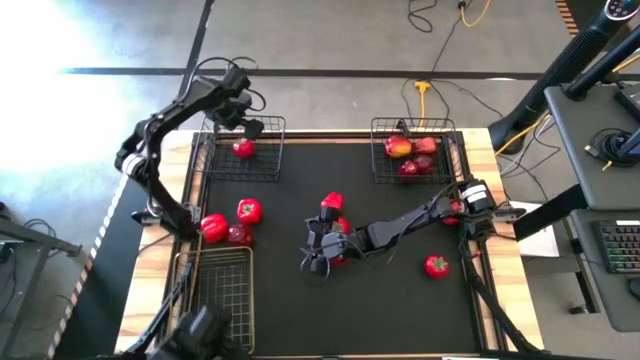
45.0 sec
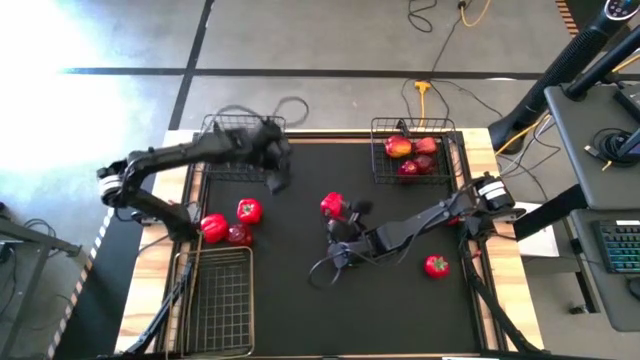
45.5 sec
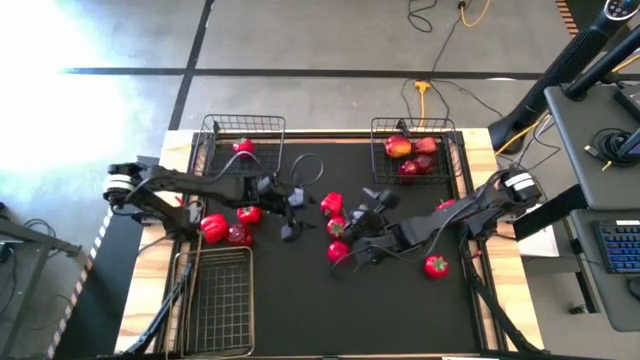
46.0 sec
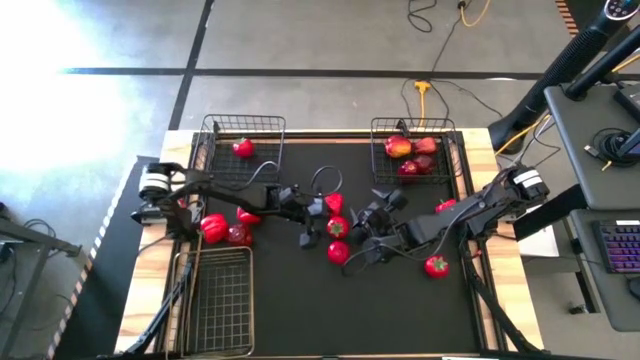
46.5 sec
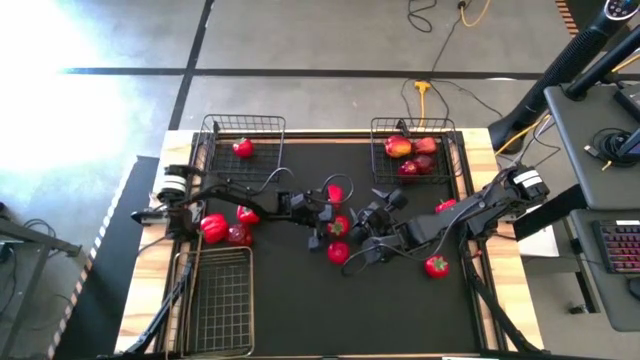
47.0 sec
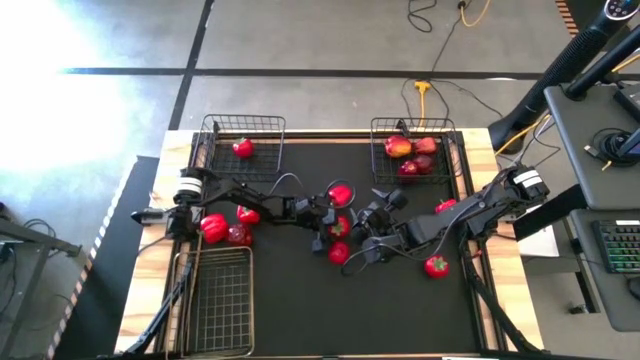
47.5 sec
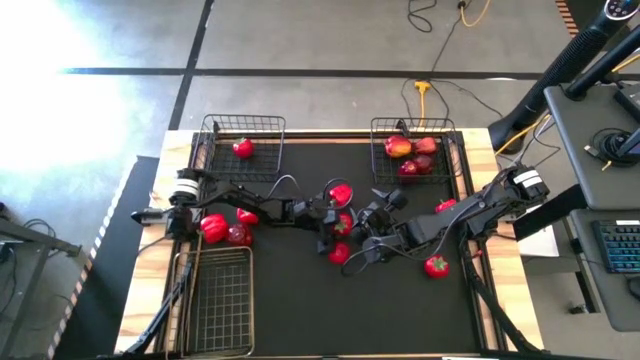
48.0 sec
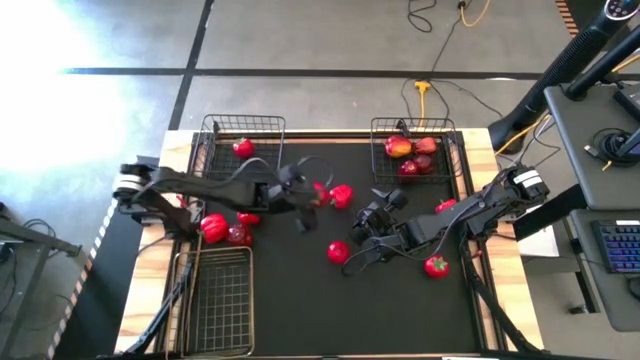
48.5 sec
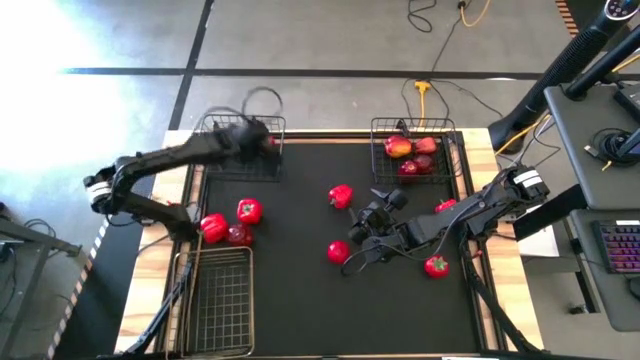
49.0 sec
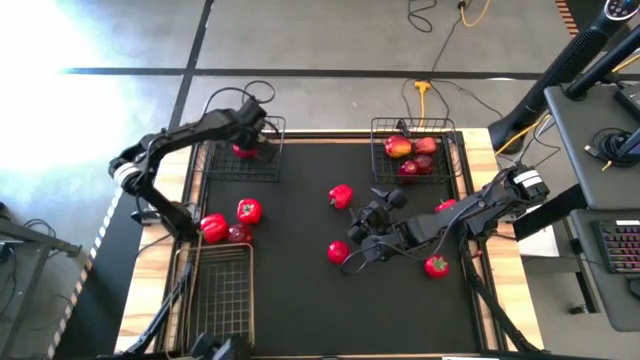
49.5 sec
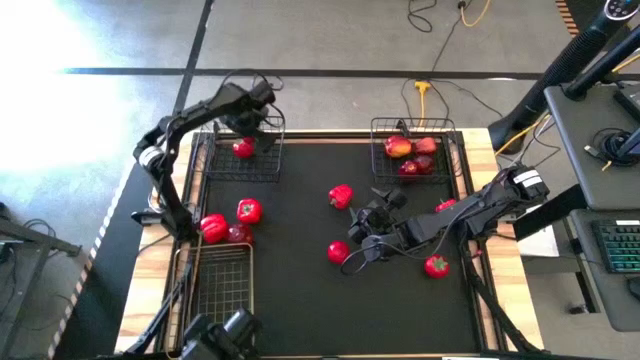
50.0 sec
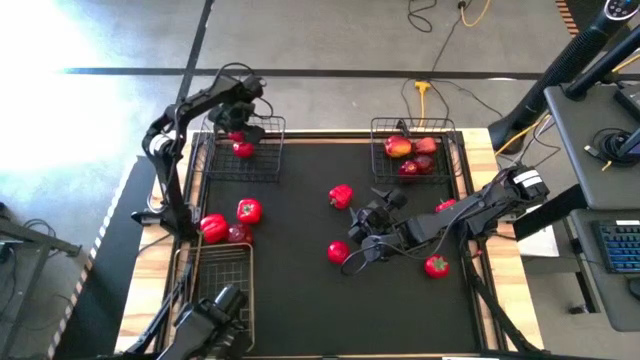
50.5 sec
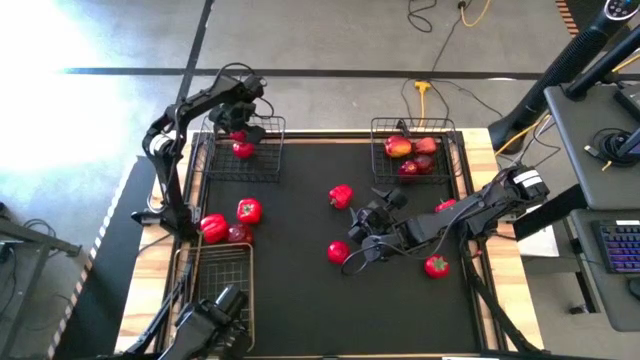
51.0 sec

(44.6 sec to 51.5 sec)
Task: Sort produce into baskets
Put the tomato into the left black wire basket

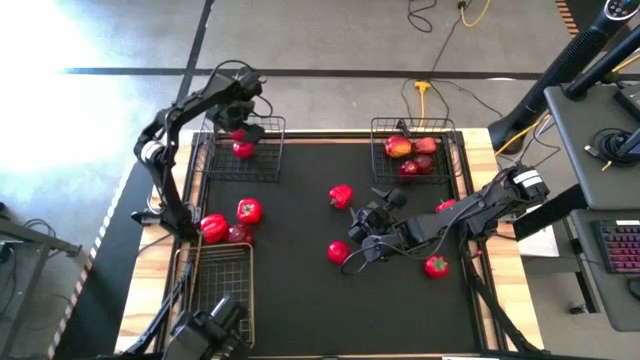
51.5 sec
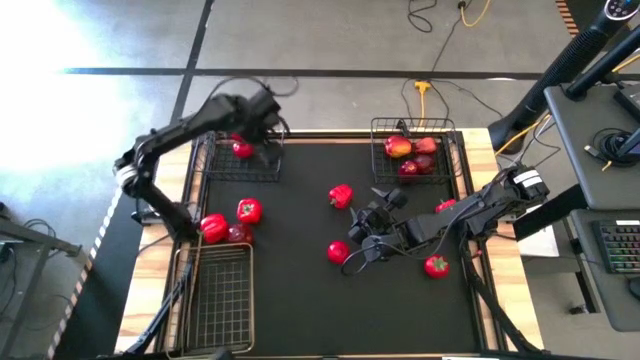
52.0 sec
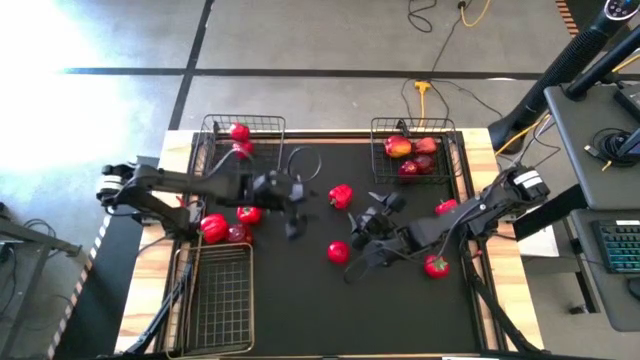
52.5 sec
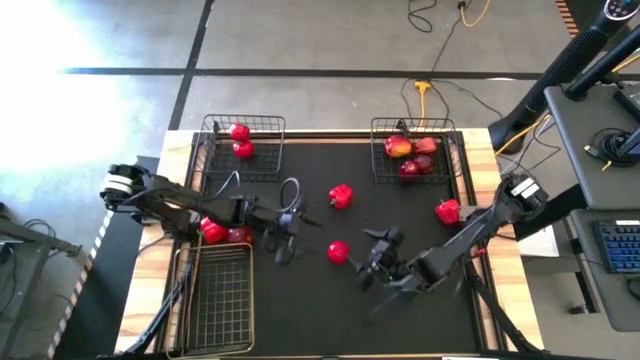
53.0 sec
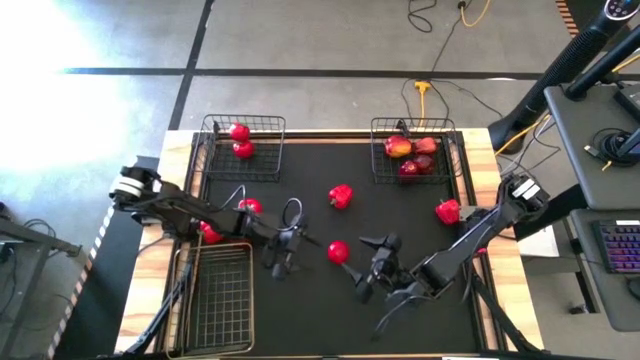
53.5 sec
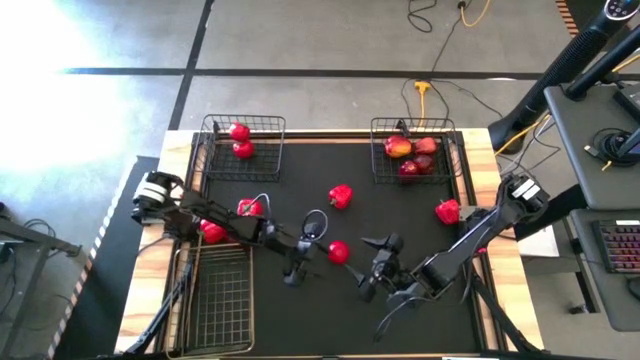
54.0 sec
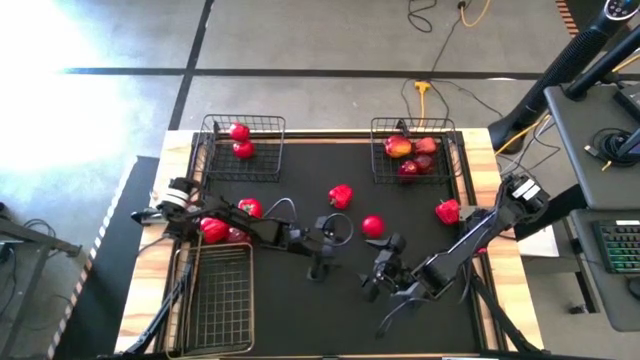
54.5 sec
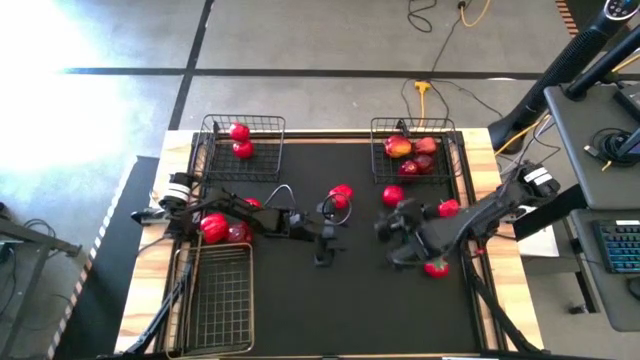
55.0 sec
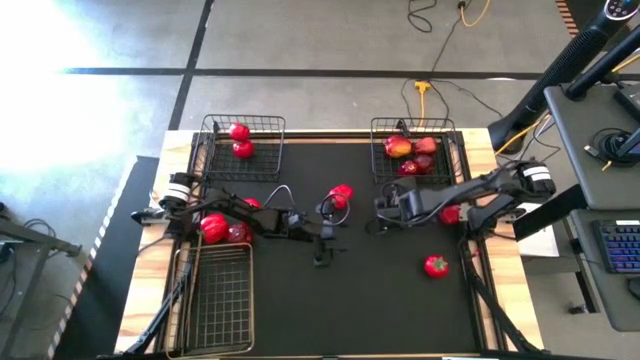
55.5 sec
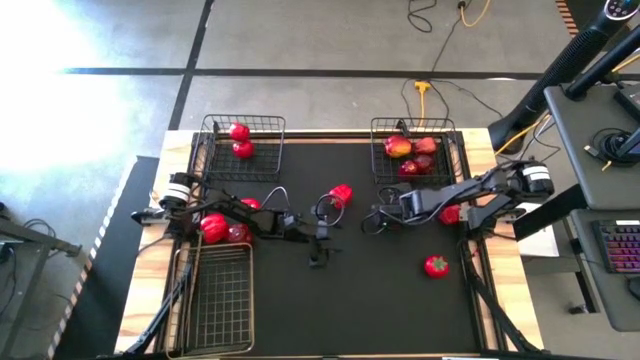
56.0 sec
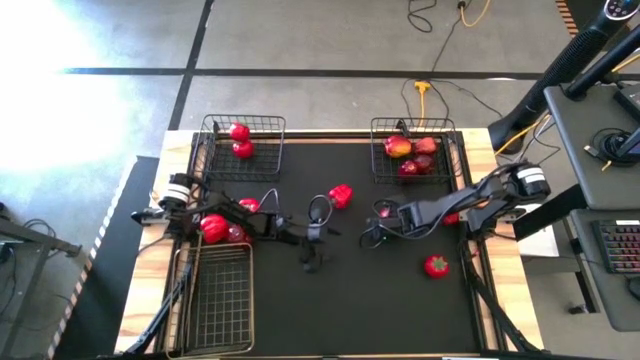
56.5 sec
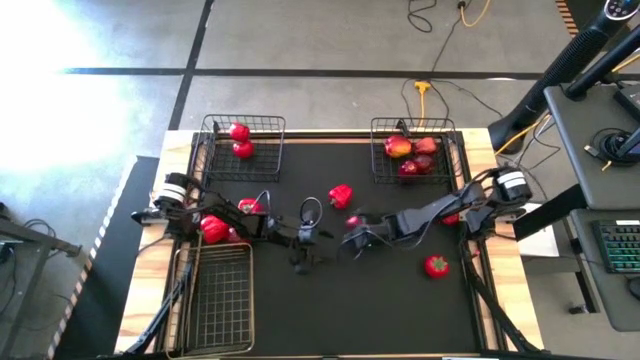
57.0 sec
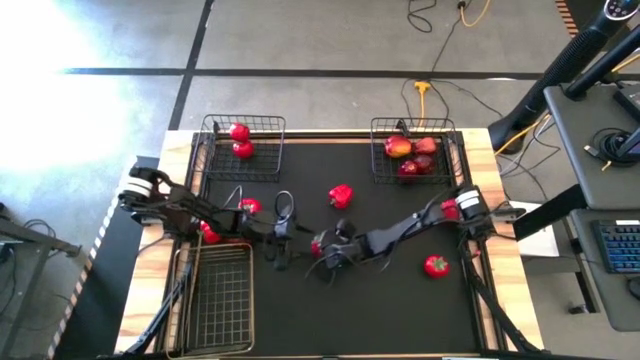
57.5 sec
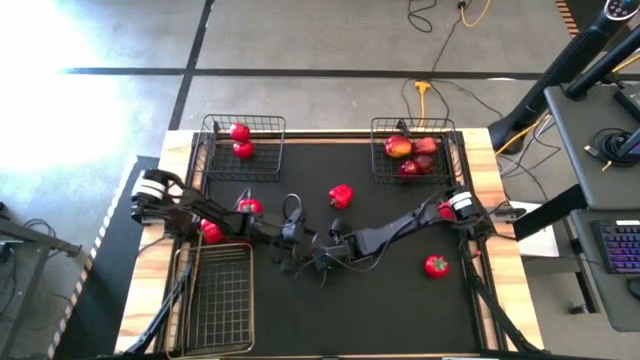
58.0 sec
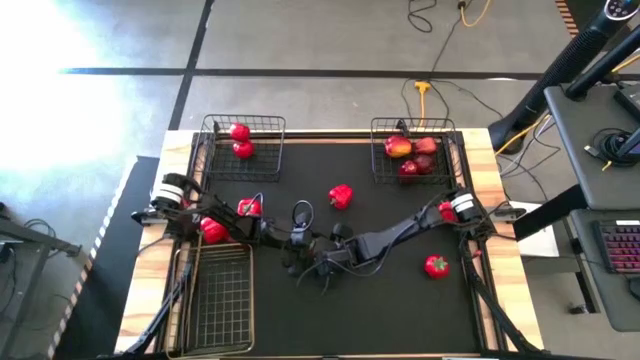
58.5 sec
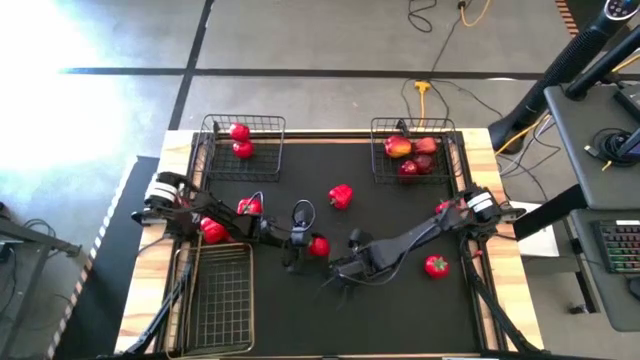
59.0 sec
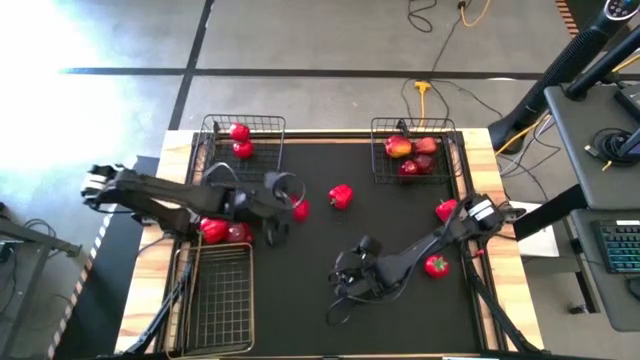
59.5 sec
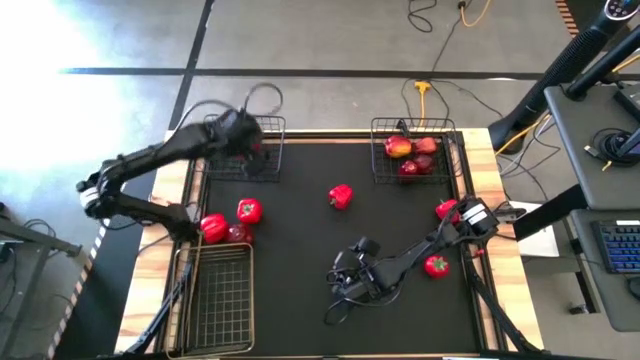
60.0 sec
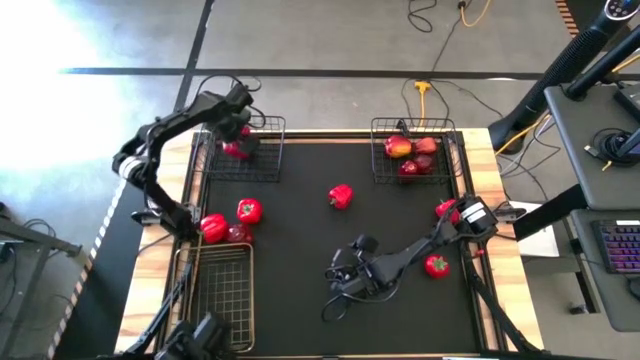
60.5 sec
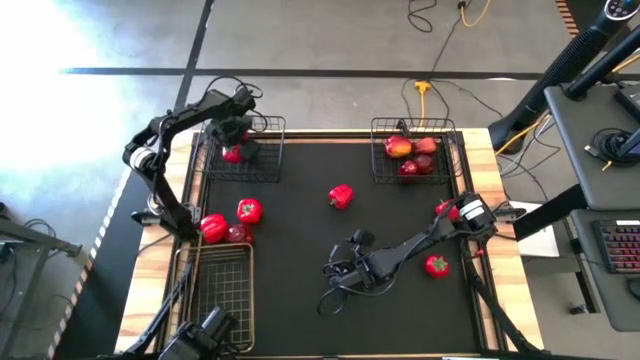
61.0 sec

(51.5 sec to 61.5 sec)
Put the tomato into the left black wire basket

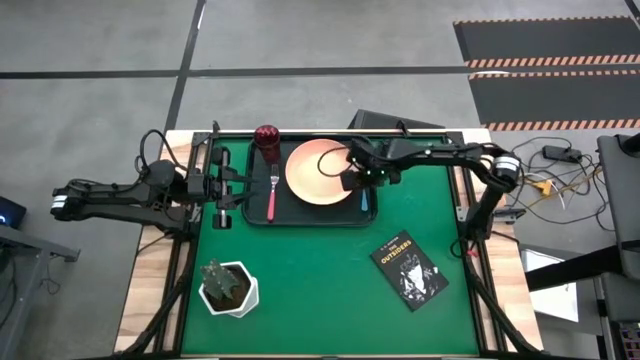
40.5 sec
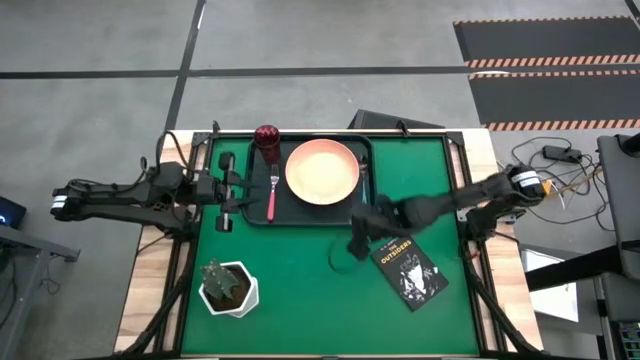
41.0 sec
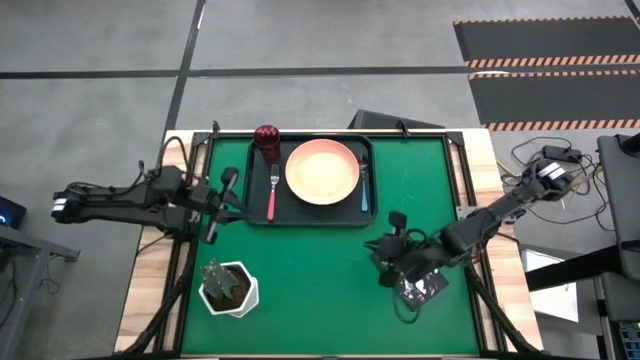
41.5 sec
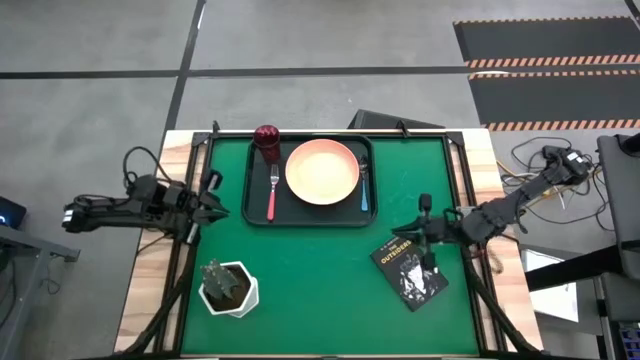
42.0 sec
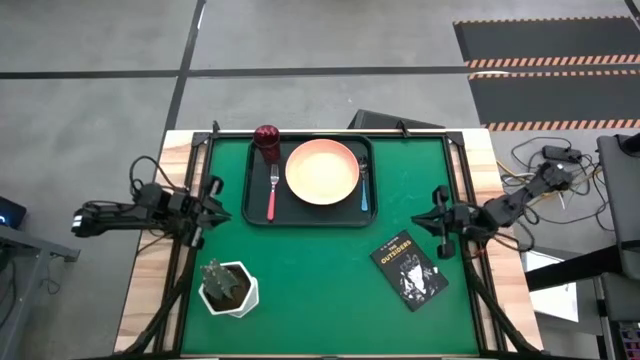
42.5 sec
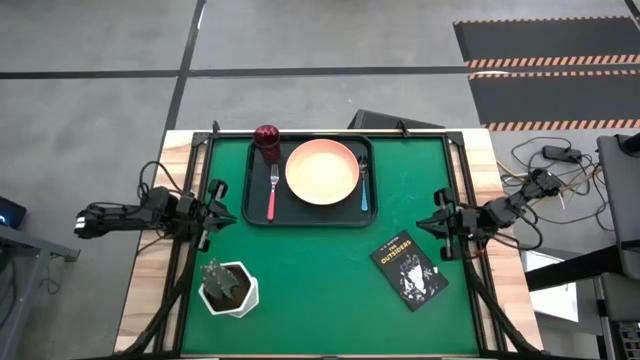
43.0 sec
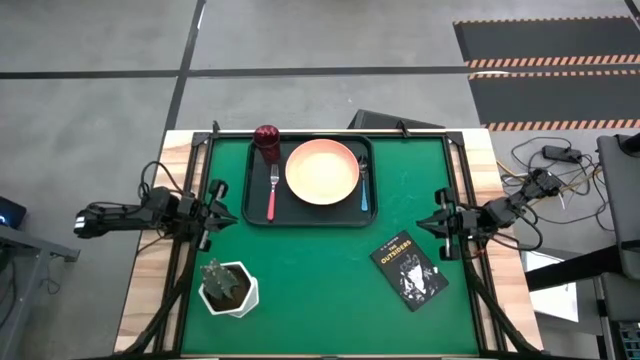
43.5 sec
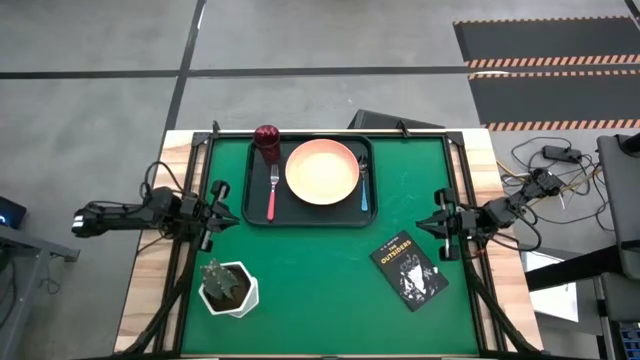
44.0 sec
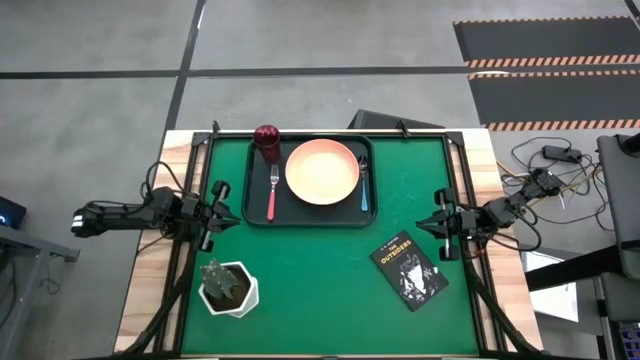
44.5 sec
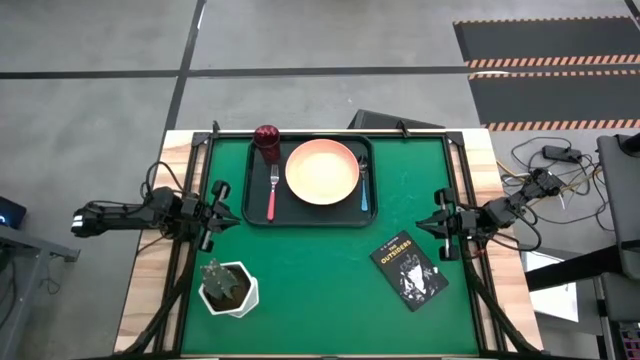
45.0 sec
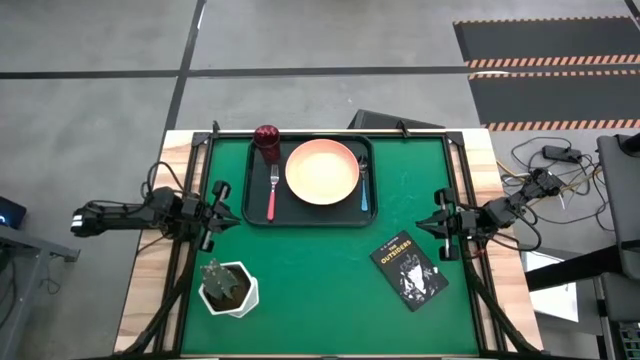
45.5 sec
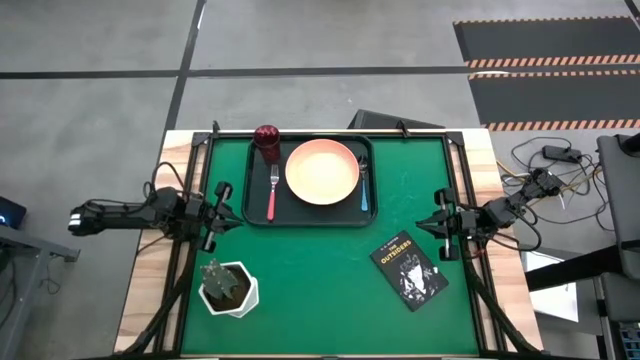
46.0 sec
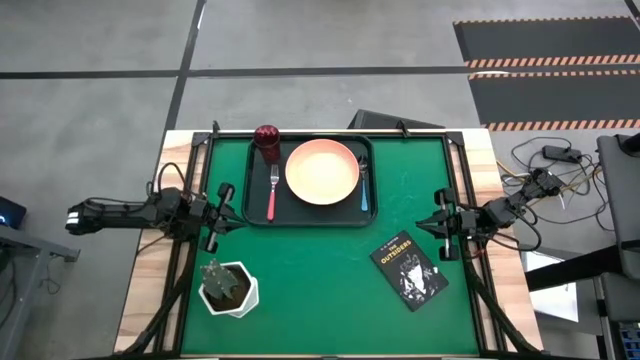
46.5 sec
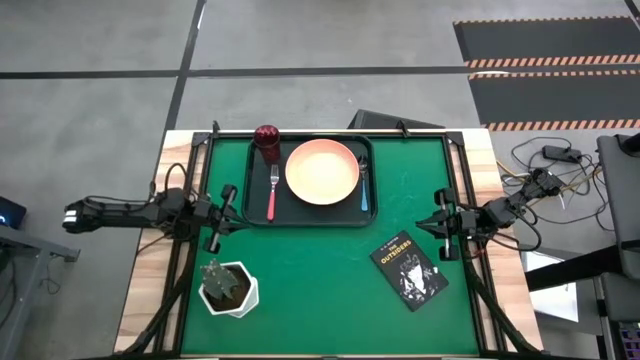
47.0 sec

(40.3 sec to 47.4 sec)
Task: Pick and place plate/cup/fork/spoon on tray
Return to Home Position
